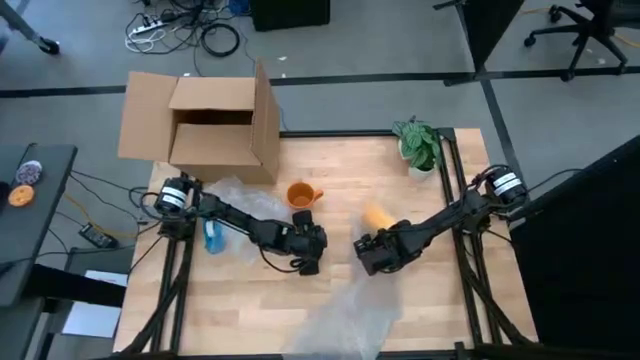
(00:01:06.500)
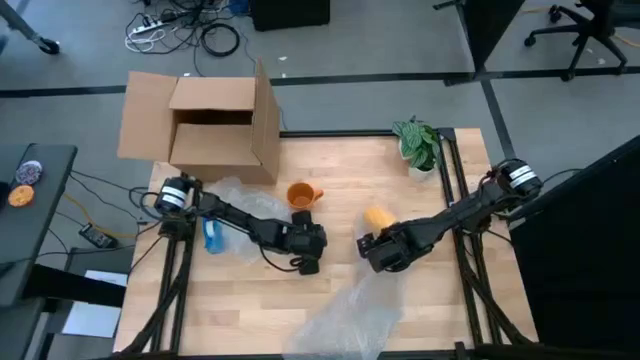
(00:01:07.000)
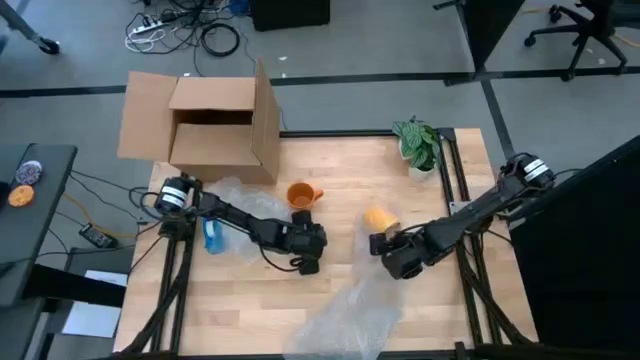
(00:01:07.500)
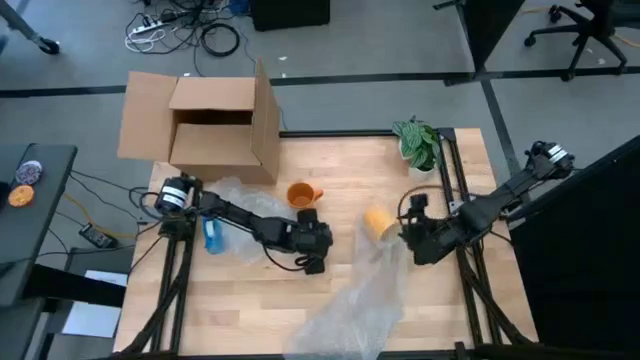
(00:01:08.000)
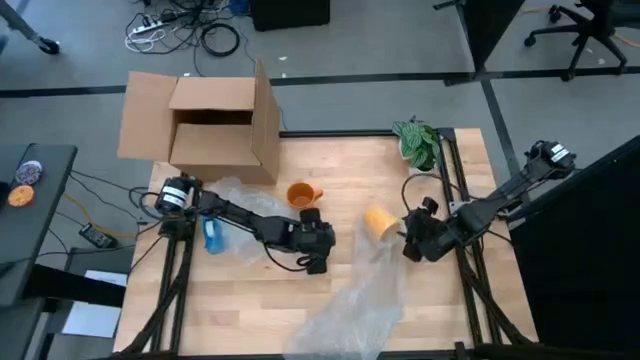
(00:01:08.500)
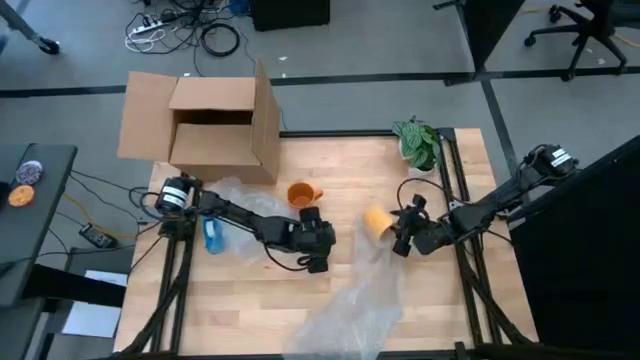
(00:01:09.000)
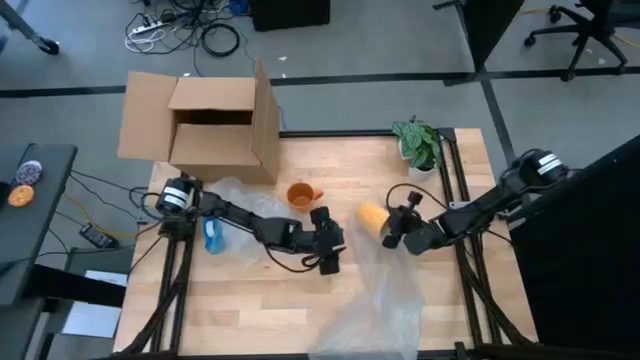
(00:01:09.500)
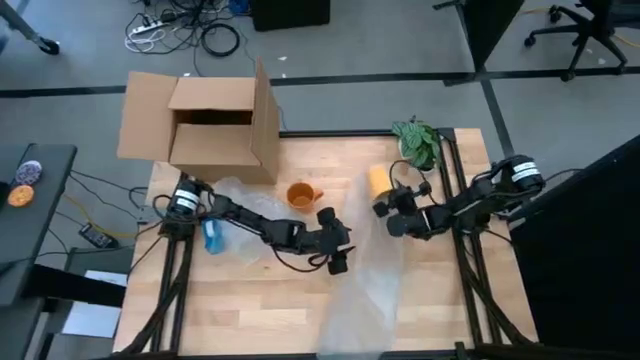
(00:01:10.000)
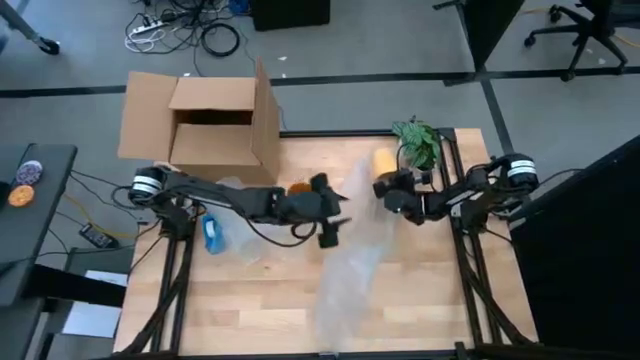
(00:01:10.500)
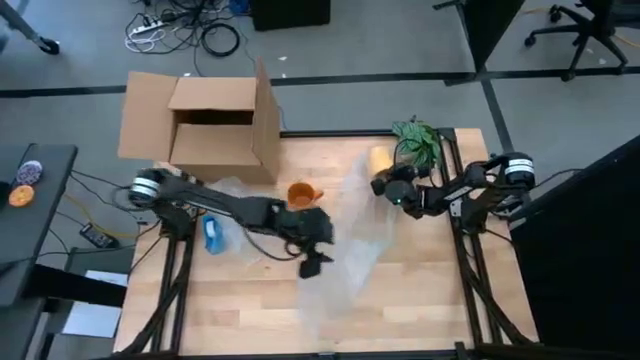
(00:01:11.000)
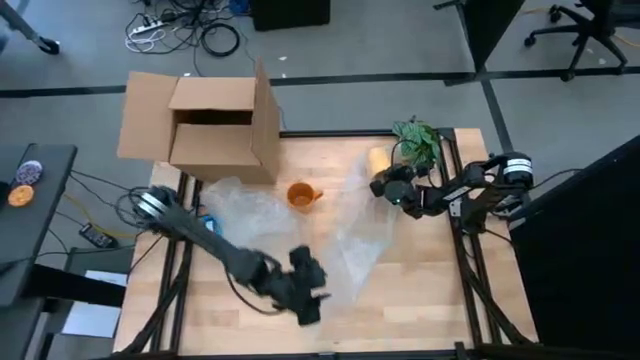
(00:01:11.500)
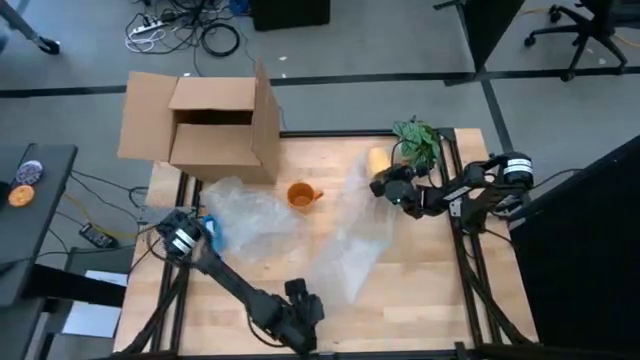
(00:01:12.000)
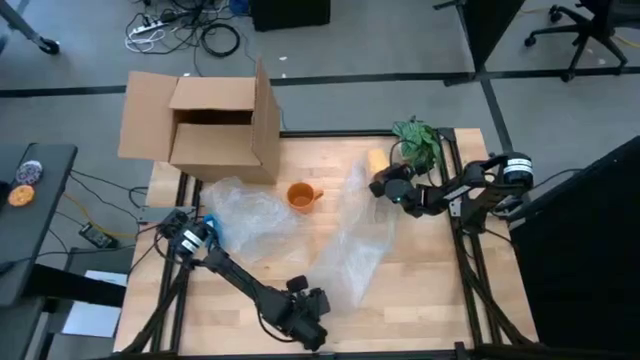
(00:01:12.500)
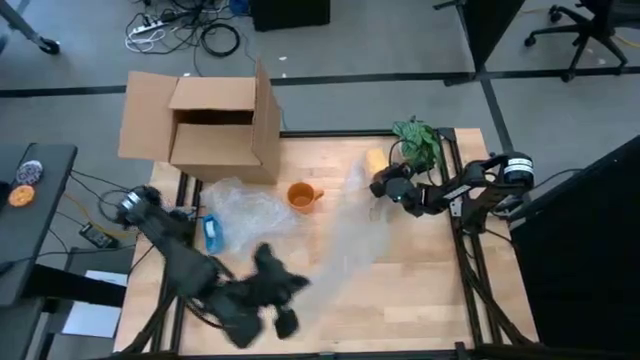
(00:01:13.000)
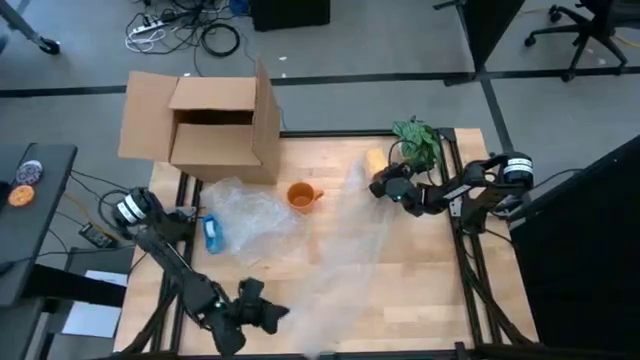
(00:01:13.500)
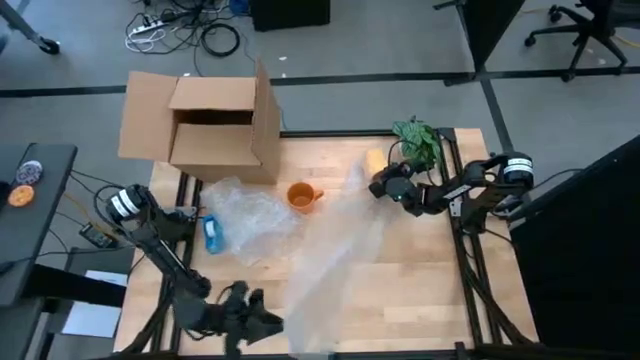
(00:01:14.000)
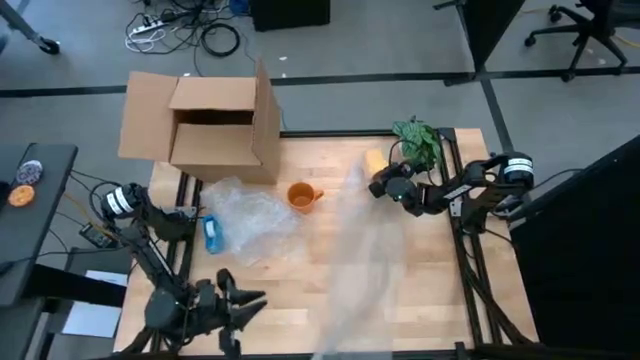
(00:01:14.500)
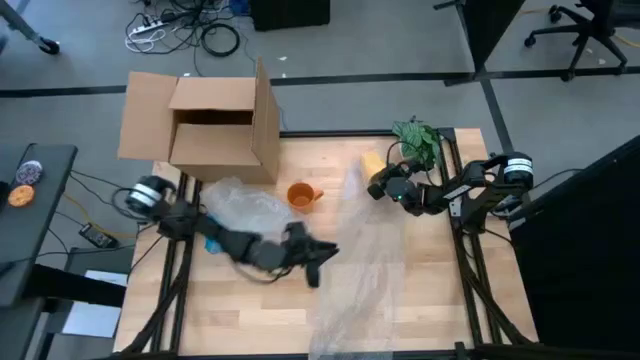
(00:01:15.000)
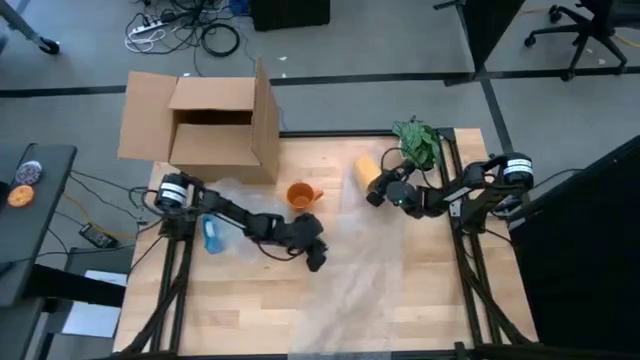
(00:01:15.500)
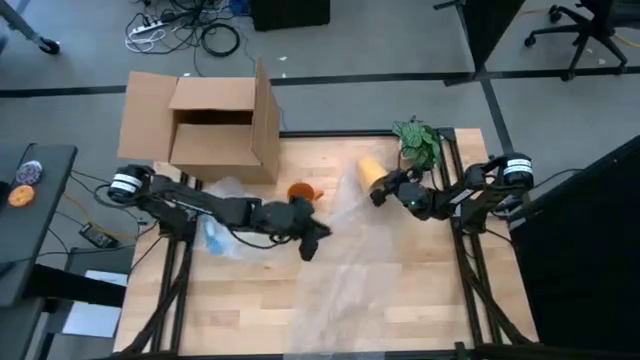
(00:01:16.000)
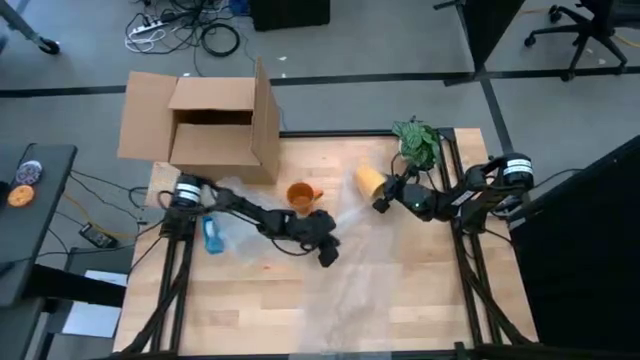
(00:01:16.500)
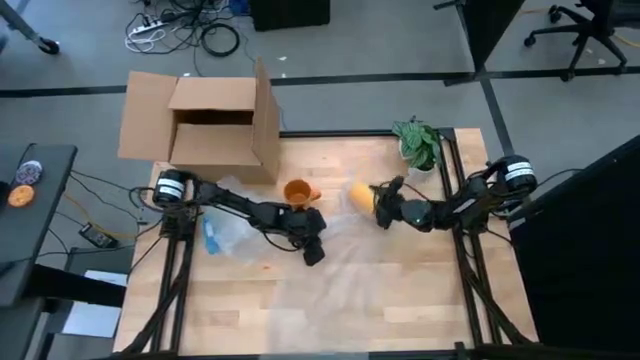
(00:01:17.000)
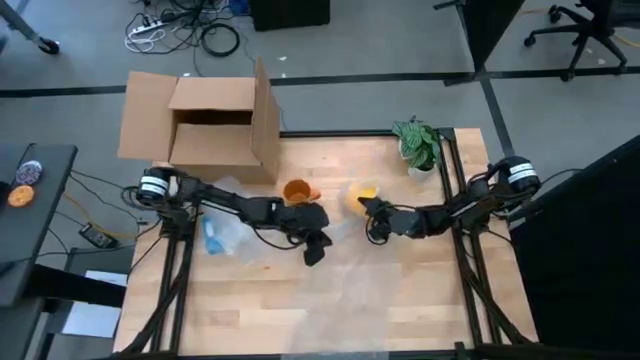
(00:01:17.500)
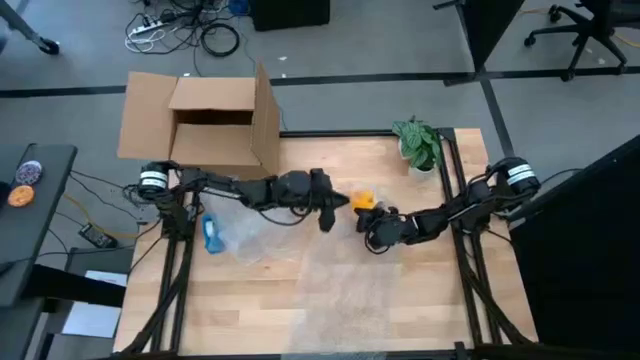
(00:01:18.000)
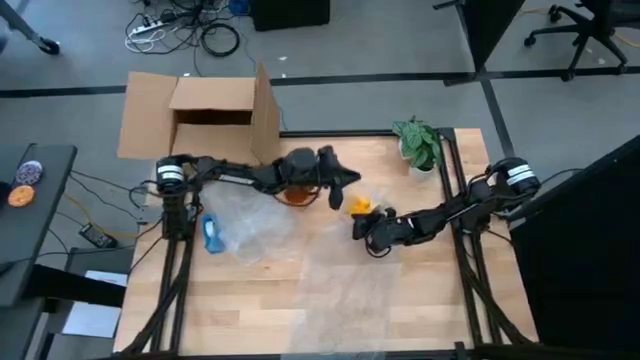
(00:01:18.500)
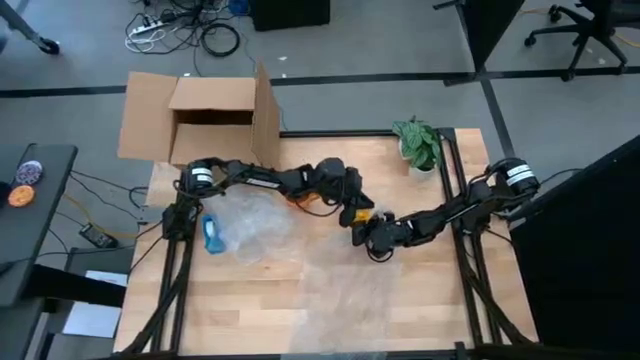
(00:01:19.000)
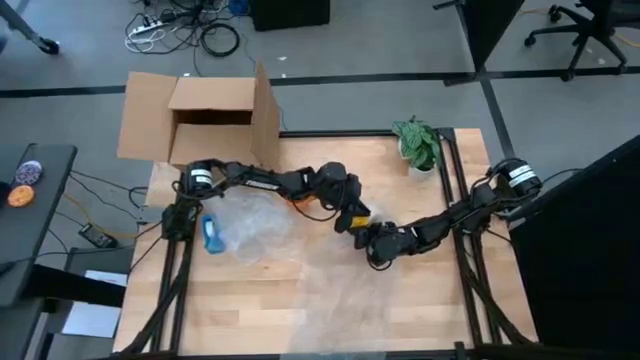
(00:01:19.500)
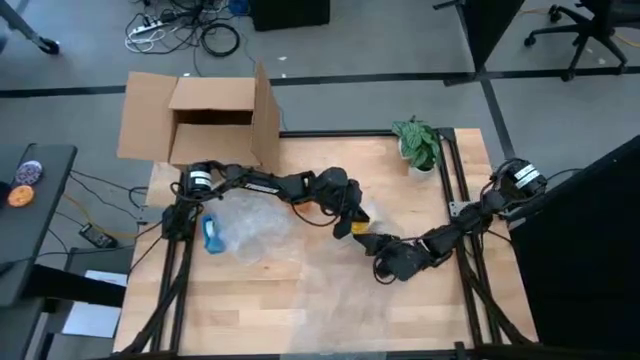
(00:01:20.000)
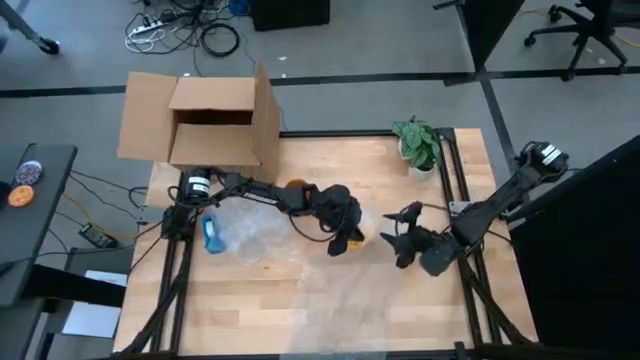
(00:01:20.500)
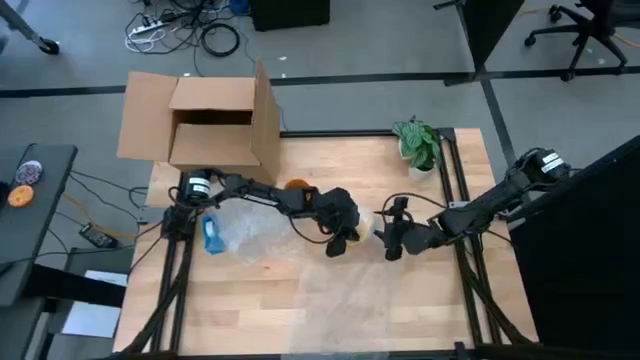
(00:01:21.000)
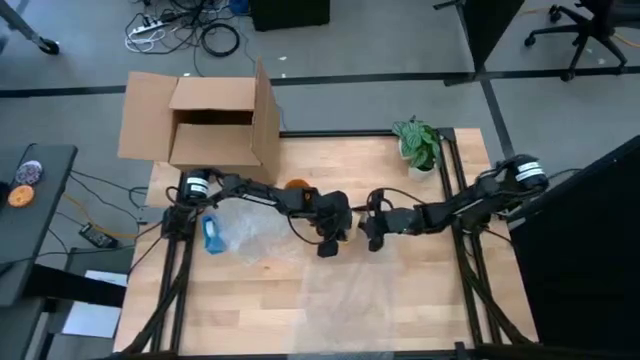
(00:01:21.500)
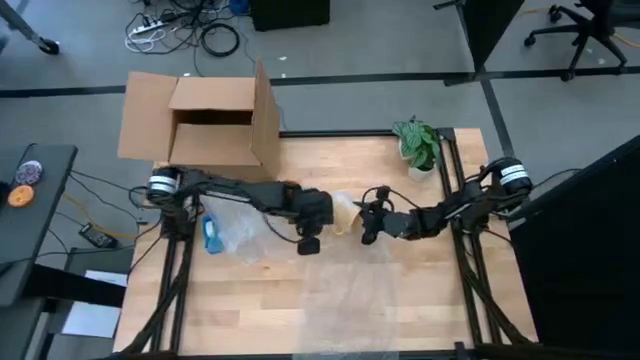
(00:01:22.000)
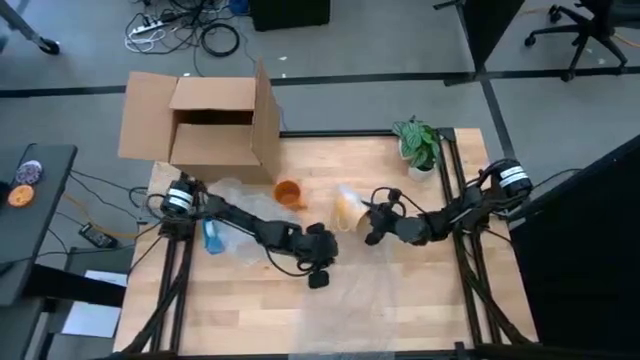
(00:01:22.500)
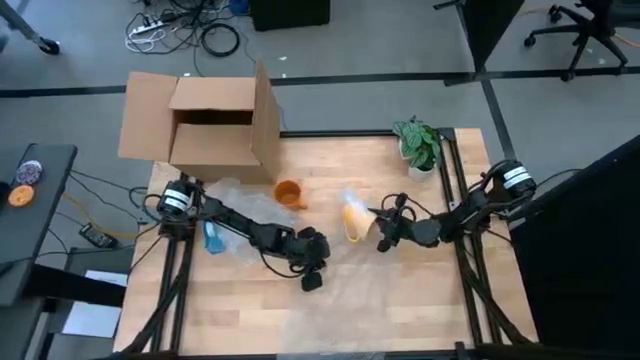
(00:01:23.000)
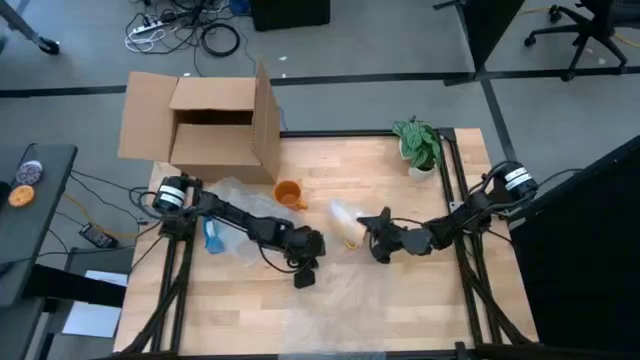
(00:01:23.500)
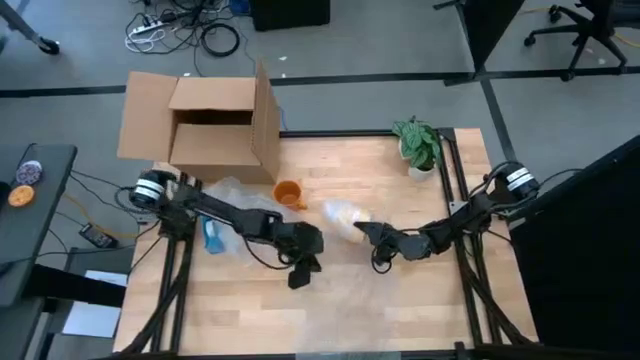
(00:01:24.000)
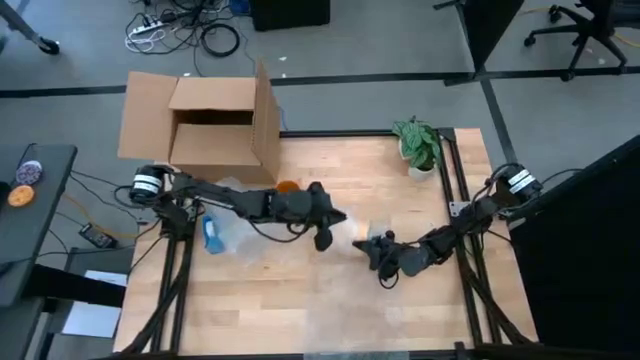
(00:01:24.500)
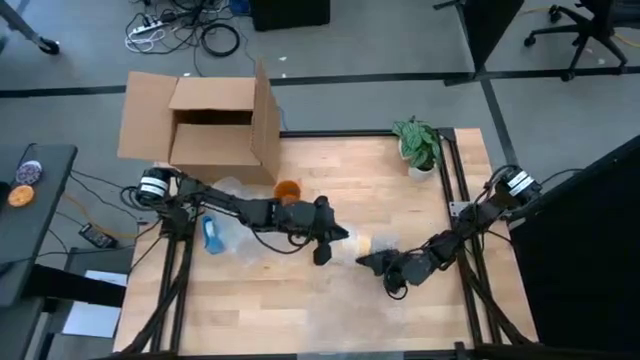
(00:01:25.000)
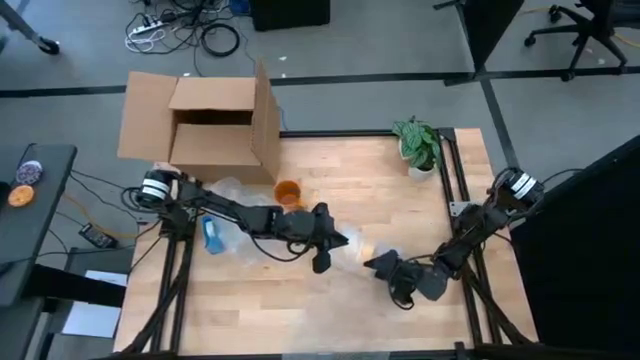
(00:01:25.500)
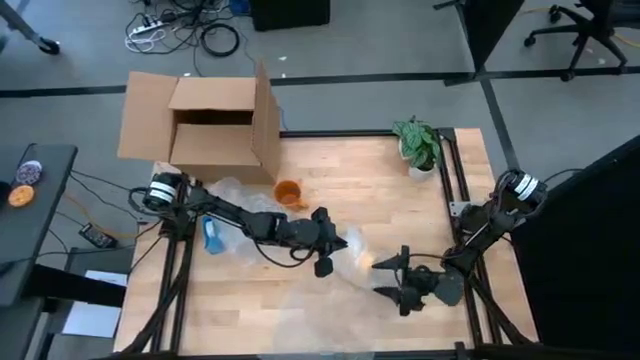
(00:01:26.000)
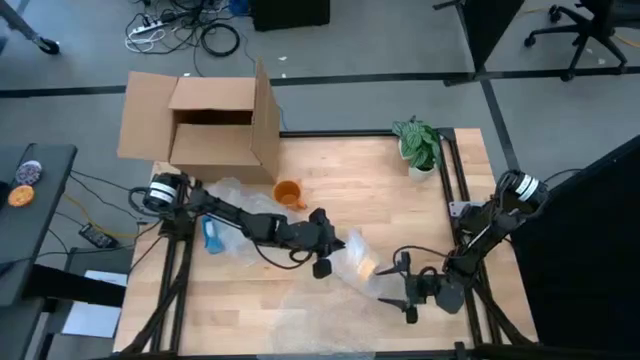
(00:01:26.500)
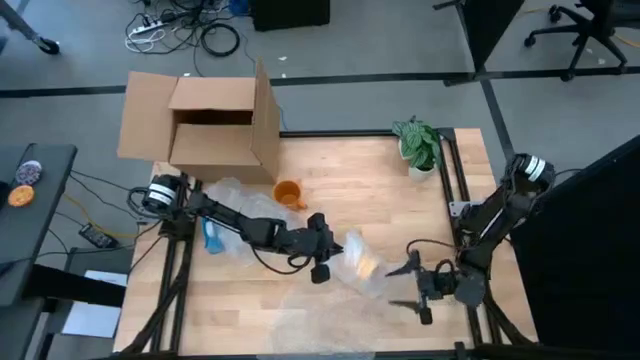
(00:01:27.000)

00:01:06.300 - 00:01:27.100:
Task: wrap mug
Wrap the yellow mug using the transparent bubble wrap
